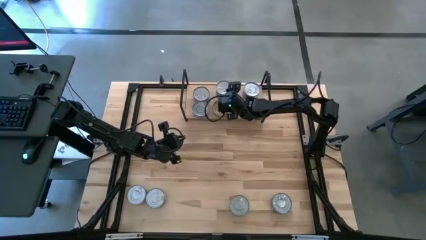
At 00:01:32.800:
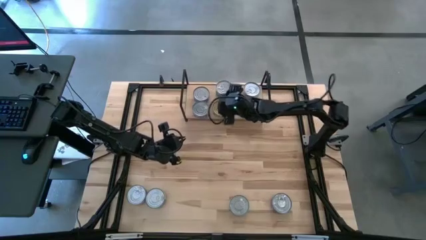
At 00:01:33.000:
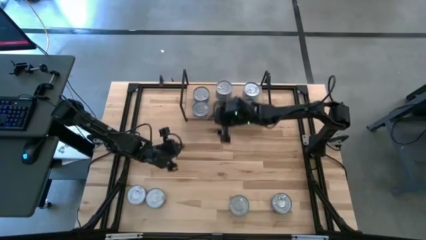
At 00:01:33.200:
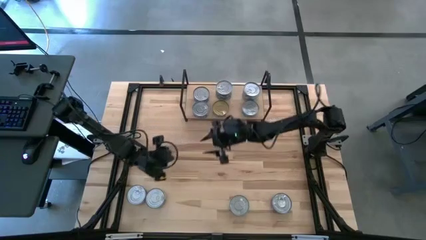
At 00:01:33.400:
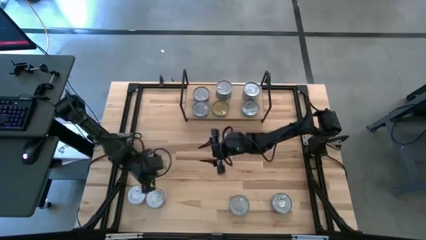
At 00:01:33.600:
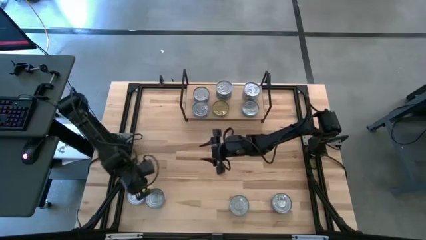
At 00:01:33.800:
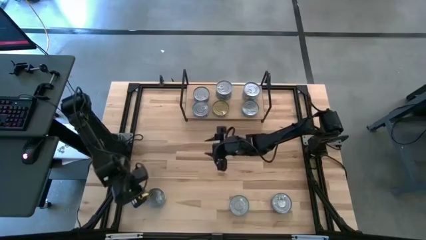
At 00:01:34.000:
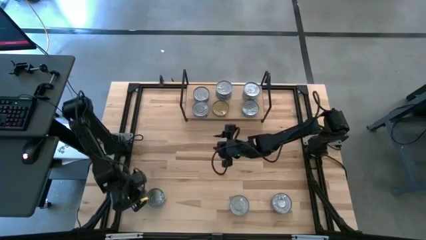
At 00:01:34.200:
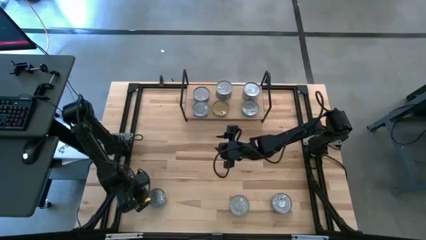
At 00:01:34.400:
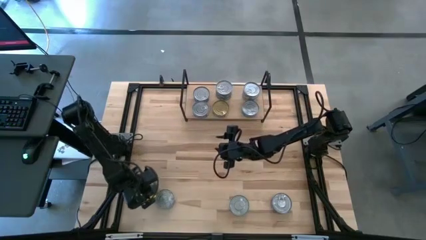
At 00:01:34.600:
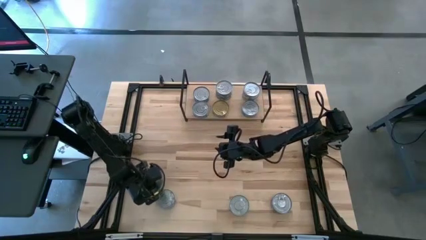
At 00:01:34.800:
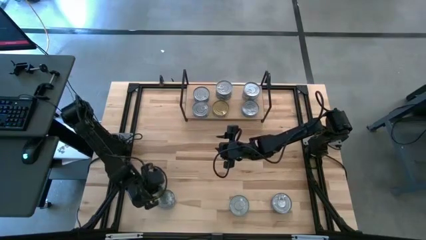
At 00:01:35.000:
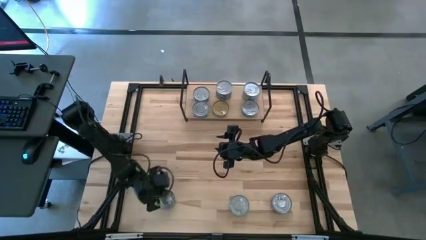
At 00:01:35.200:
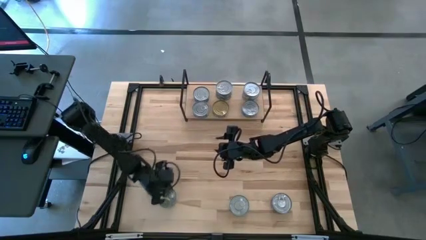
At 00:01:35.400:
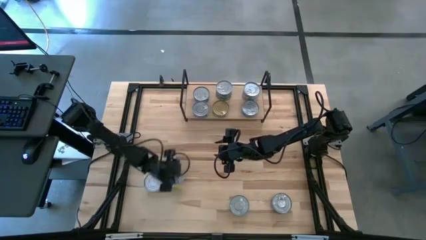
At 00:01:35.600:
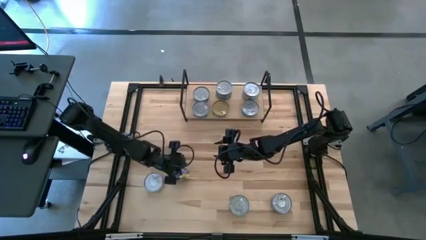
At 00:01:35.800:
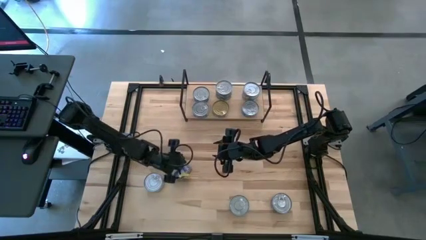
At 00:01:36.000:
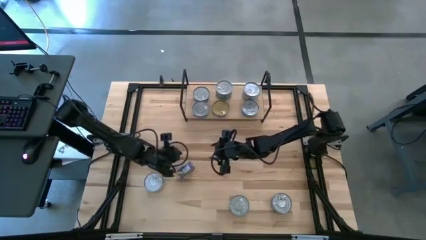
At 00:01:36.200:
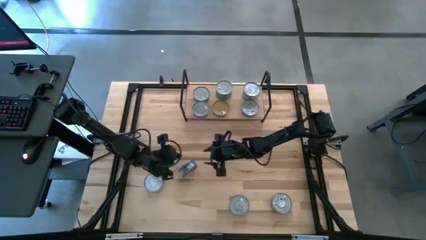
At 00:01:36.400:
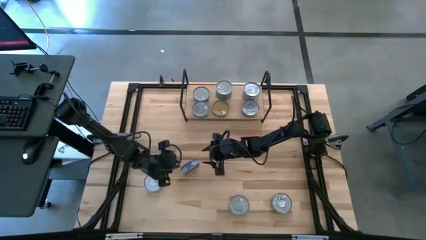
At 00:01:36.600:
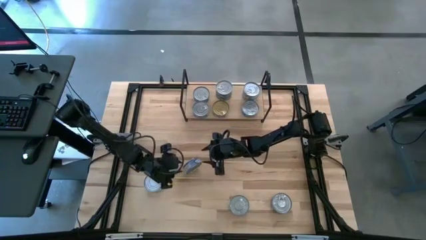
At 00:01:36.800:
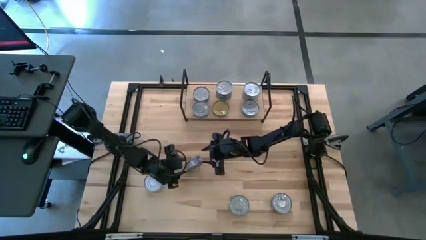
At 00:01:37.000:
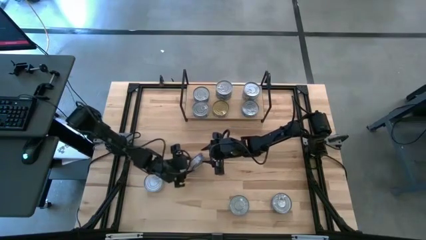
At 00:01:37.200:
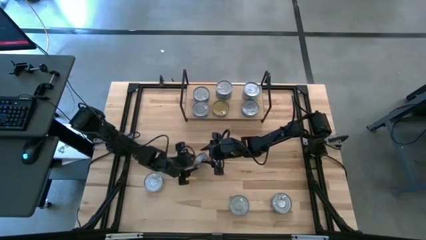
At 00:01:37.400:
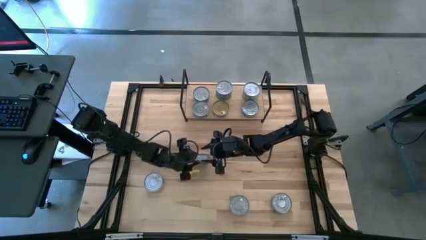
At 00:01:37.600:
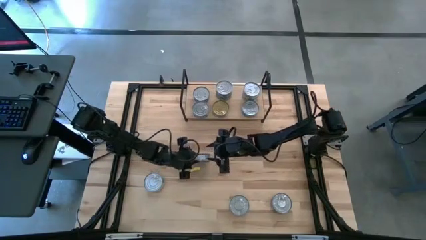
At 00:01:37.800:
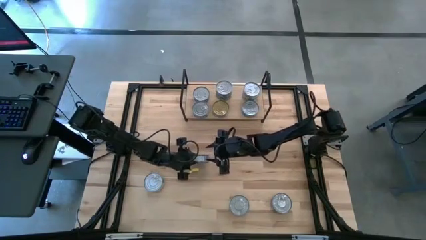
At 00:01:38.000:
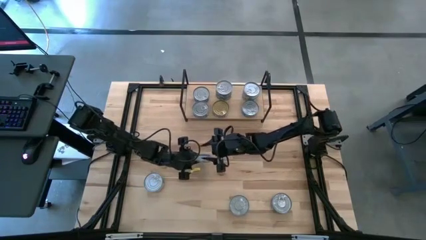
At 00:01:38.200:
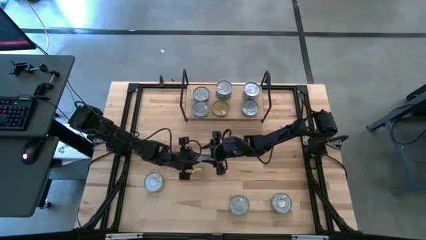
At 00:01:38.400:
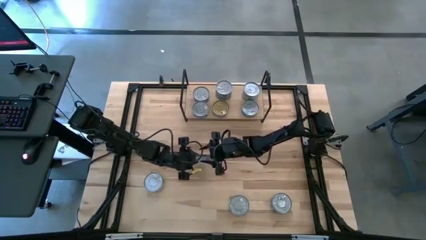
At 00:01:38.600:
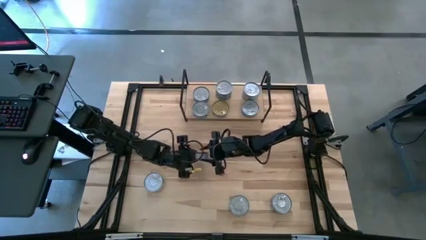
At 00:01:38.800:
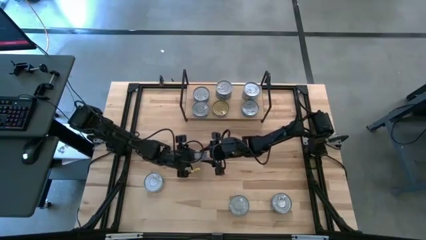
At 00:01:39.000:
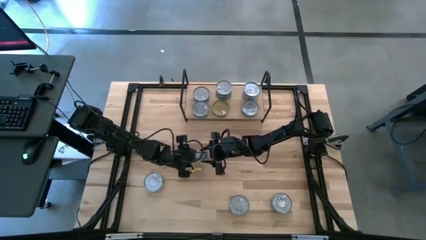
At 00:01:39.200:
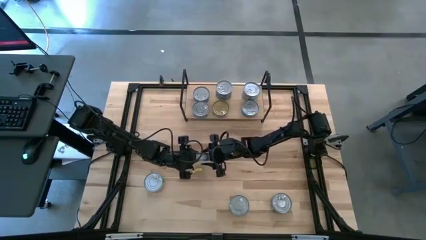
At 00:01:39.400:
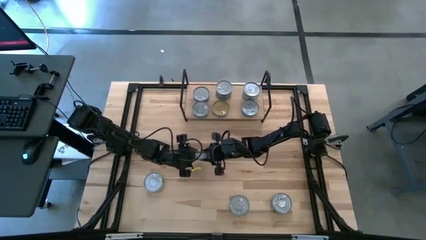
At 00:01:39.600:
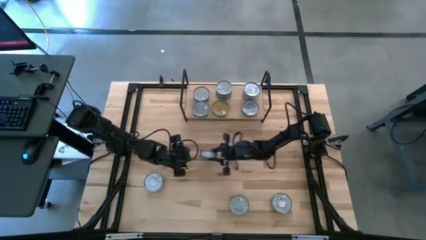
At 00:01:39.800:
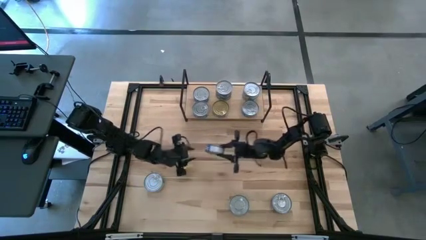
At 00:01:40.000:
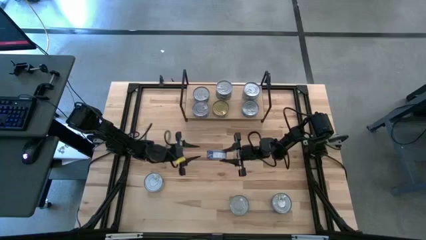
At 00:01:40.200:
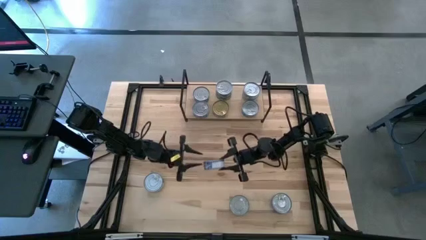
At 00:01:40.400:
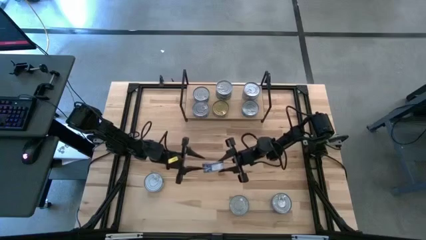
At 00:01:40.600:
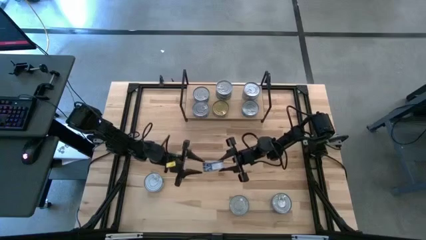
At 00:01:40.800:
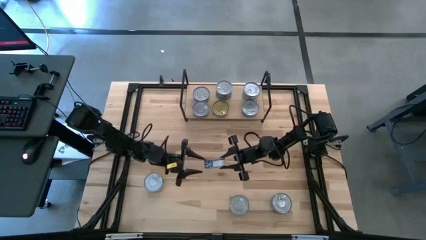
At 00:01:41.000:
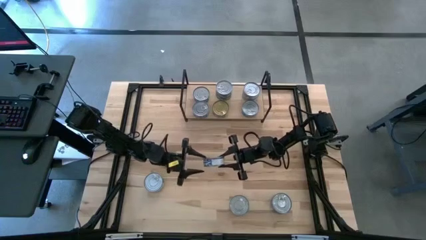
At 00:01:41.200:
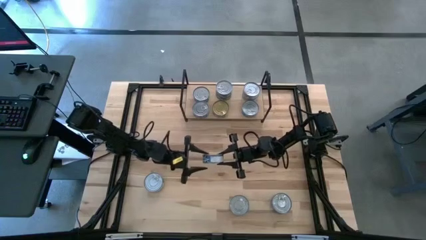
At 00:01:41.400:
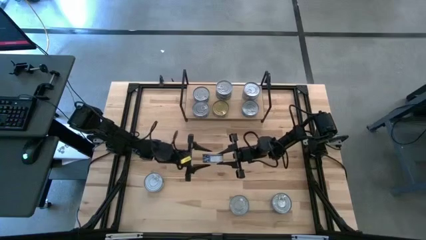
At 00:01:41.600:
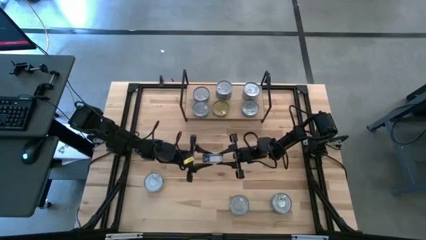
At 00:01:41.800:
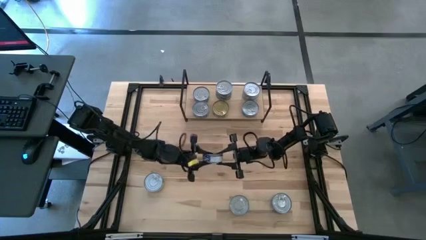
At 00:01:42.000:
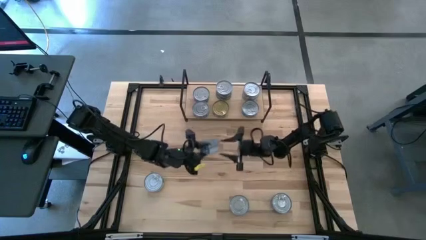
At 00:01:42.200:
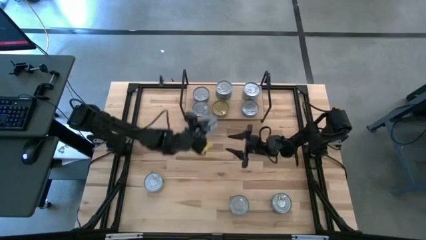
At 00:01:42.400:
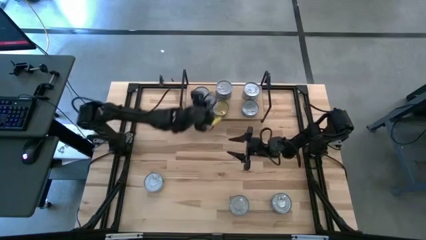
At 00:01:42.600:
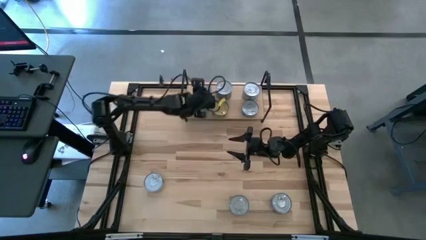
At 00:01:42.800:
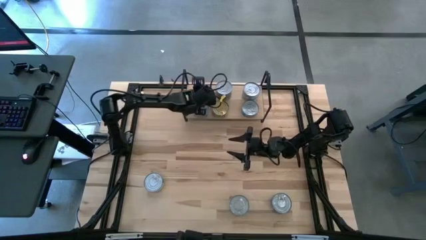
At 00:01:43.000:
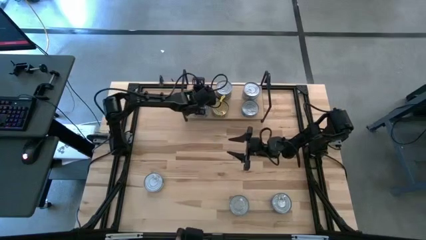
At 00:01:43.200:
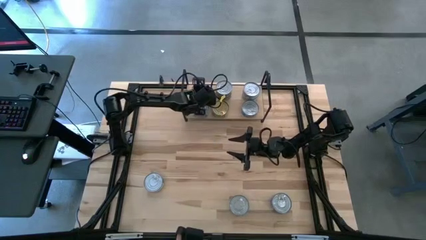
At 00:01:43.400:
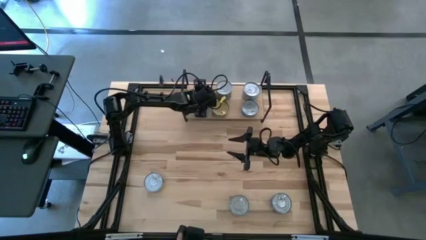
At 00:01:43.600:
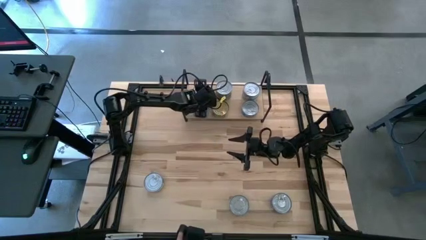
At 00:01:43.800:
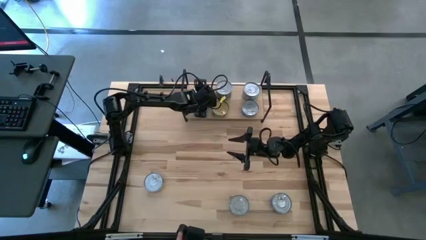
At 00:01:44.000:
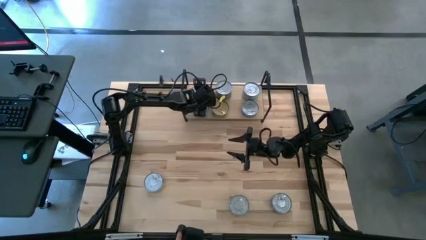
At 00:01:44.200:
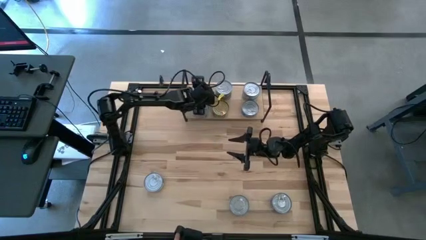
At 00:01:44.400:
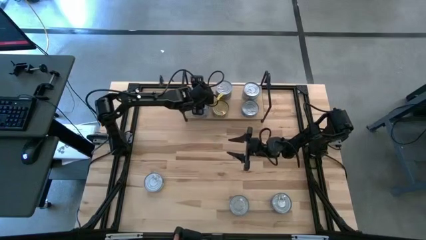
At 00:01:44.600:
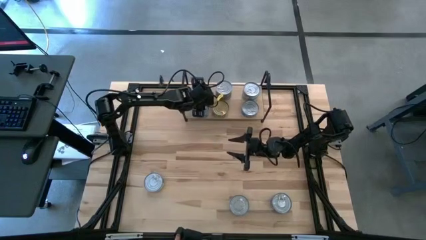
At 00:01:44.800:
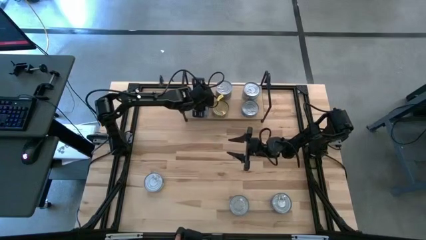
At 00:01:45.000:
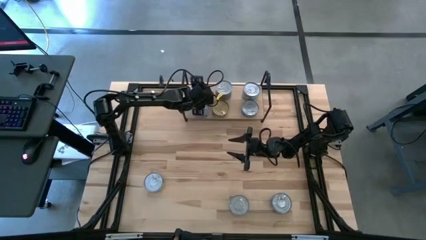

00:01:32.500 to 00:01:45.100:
Task: Stack canned seafood by type on shelf
Stack the left blue tuna can on top of the top blue tuna can on the shelf

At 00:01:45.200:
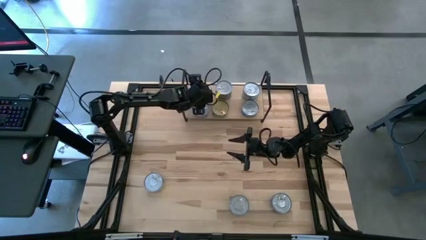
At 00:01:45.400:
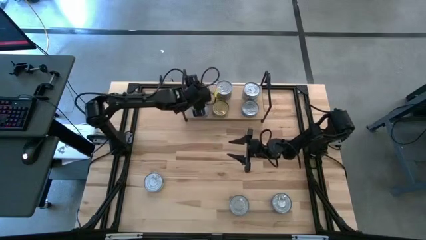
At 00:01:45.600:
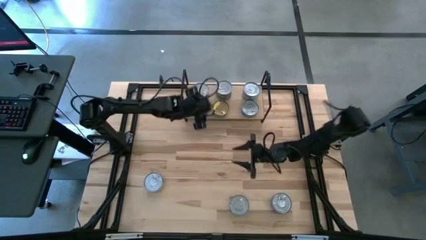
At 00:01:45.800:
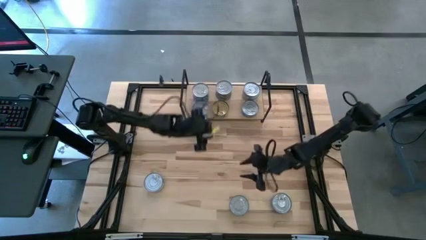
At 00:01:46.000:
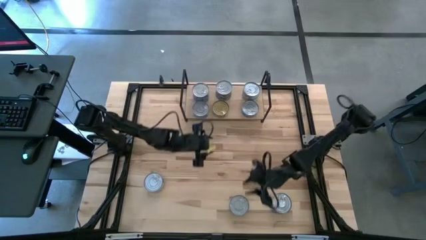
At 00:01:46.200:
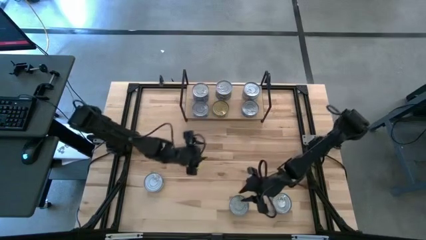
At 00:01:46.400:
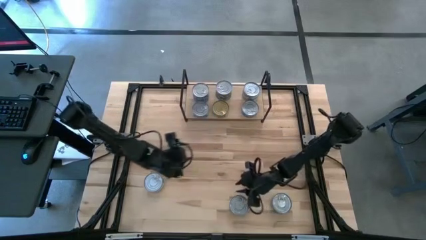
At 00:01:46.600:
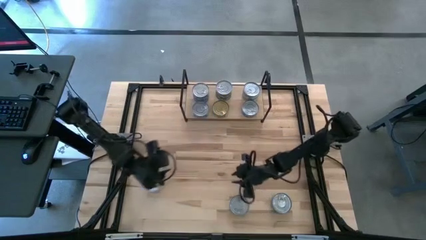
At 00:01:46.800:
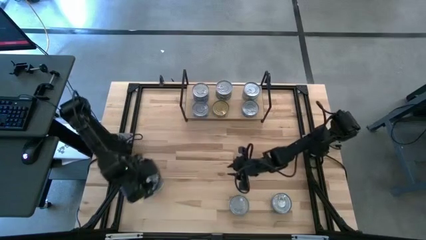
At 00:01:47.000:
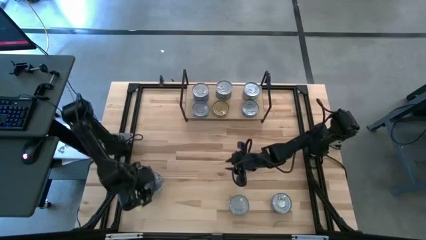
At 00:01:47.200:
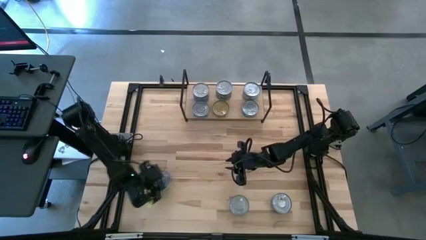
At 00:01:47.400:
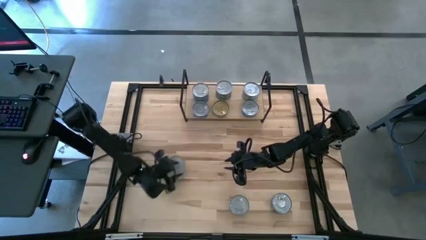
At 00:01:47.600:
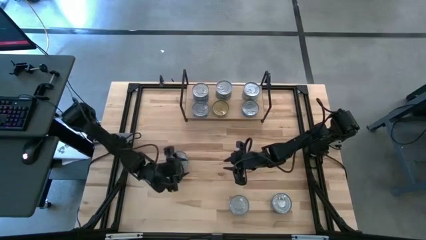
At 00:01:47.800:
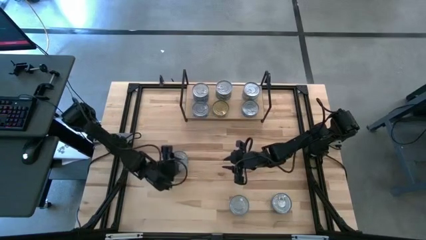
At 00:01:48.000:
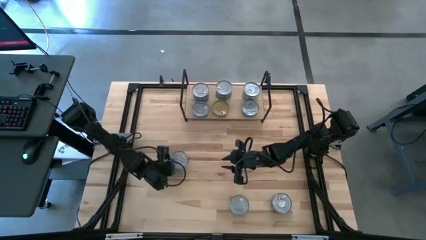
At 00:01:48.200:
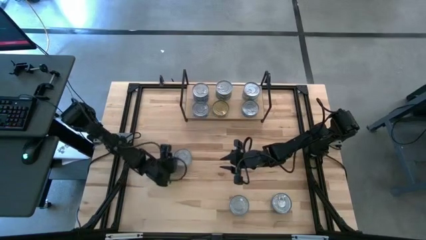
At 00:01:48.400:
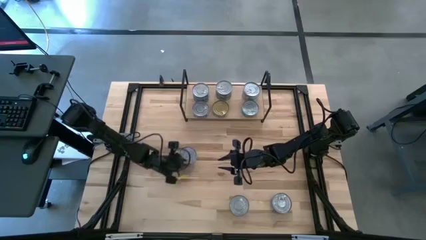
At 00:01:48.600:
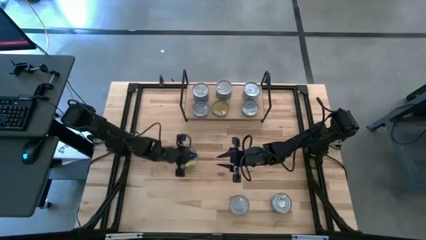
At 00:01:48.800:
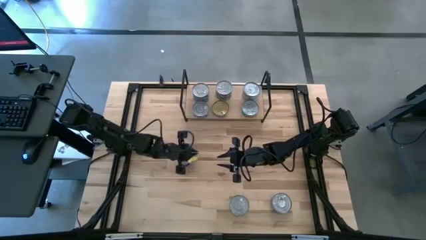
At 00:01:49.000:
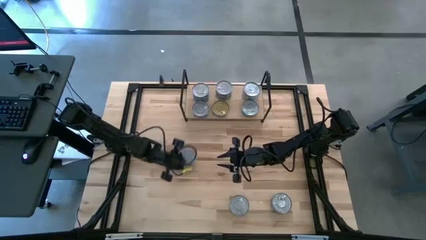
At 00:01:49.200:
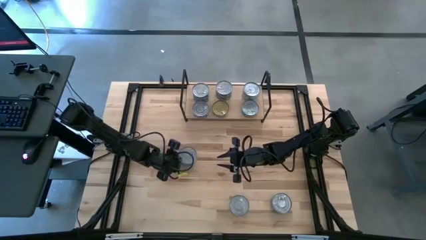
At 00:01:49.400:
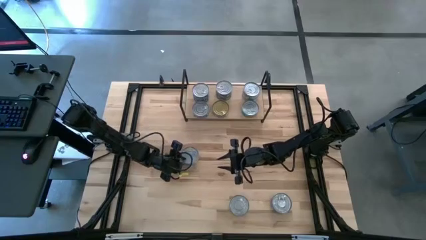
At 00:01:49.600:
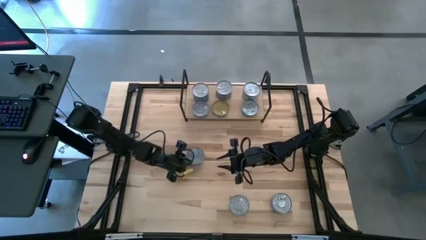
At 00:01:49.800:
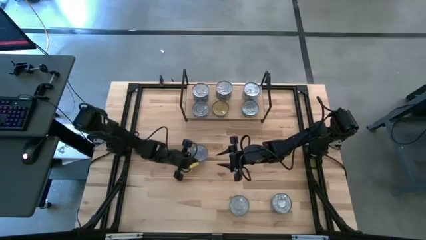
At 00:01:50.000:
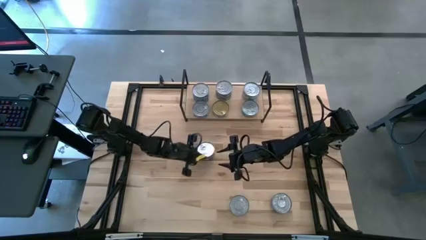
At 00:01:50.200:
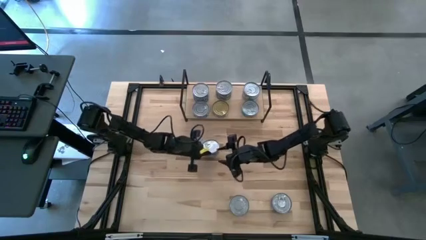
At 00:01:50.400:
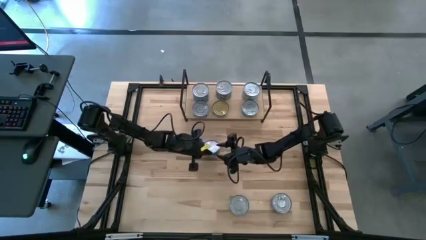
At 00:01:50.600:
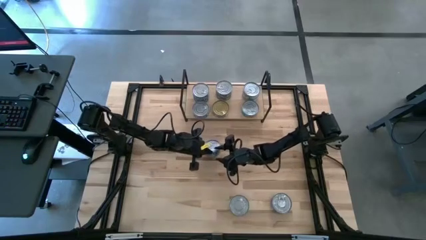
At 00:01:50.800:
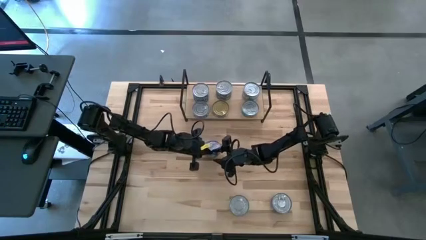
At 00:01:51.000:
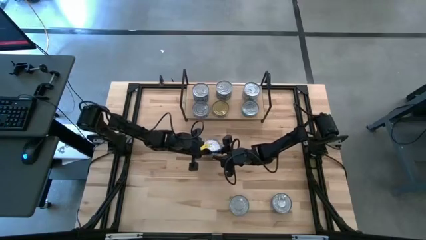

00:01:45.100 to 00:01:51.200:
Stack the green tuna can on top of the bottom green tuna can on the shelf
